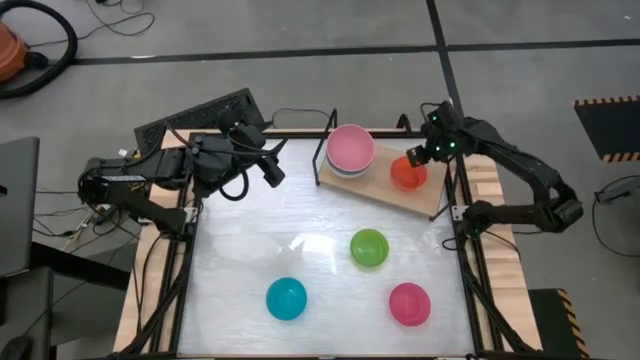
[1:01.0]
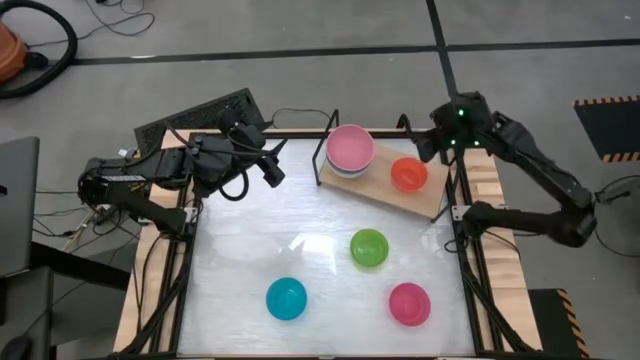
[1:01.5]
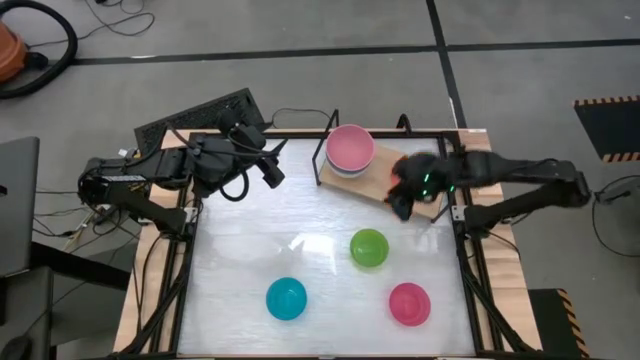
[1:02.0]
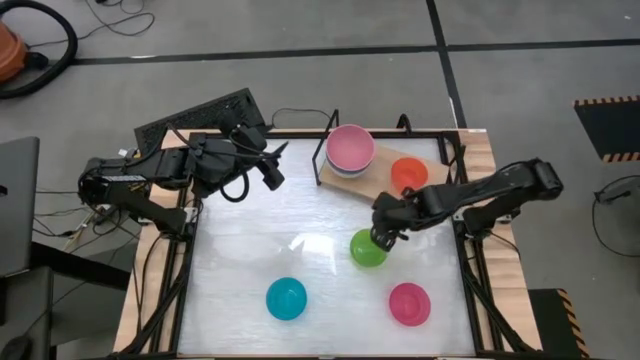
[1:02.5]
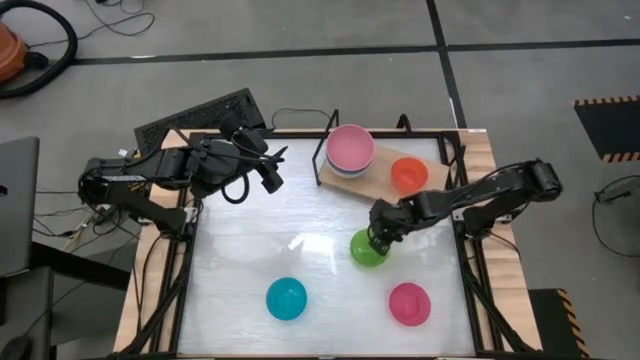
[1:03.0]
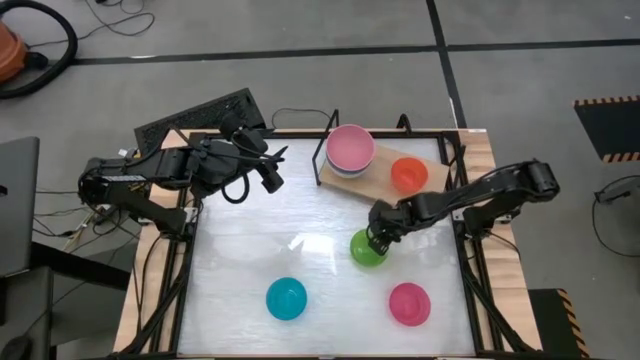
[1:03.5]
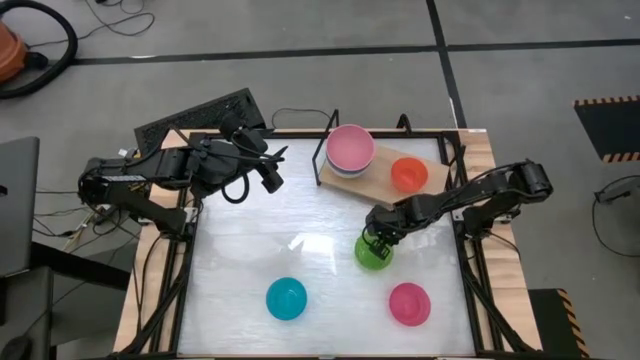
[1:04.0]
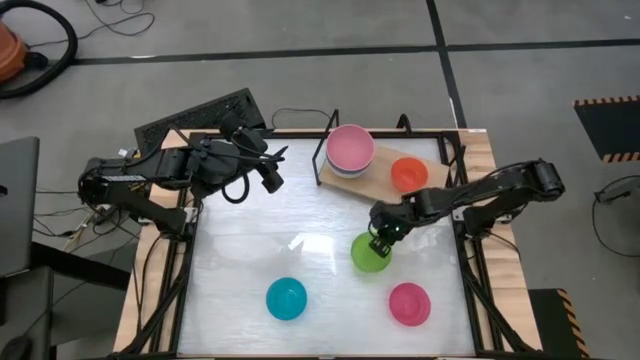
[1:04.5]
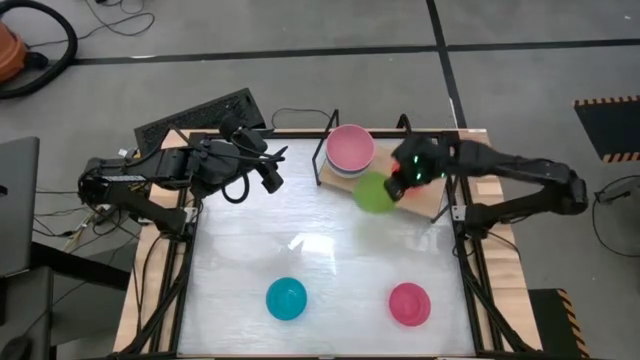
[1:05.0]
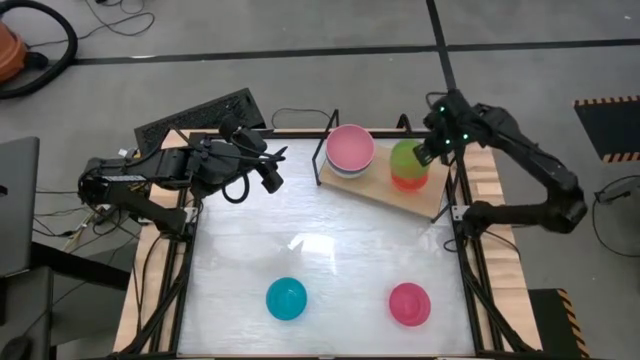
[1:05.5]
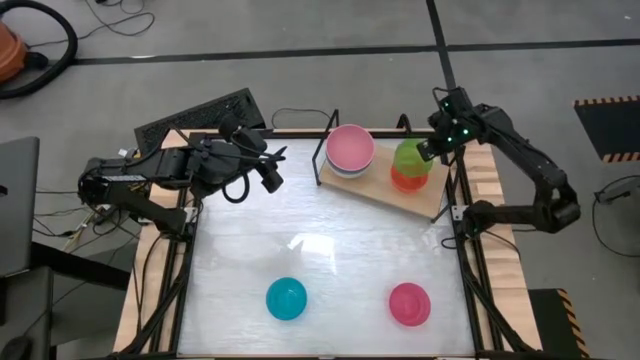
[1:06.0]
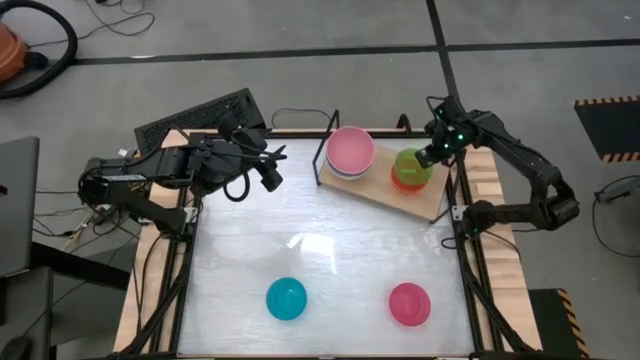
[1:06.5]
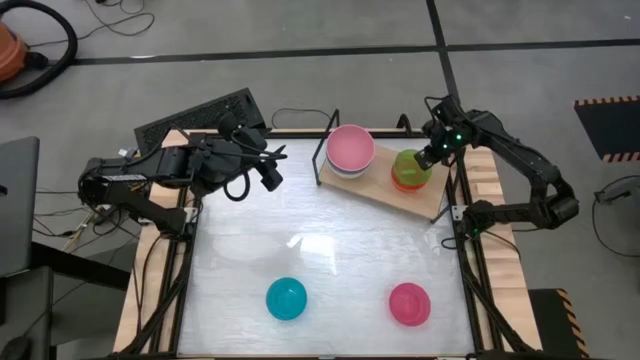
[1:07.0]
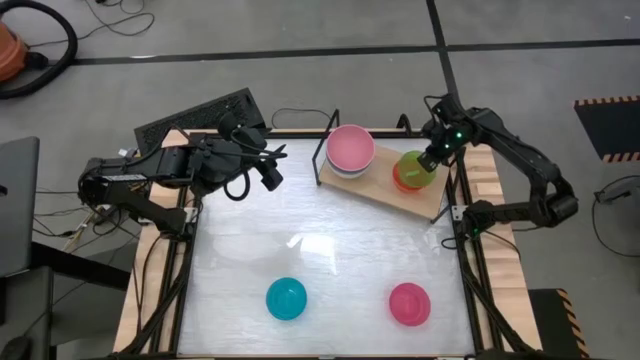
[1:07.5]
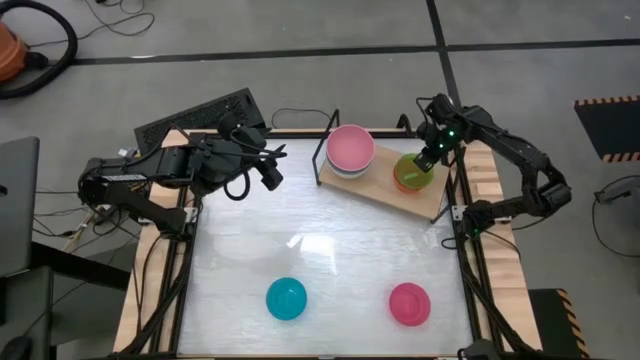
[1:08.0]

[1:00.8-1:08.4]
Task: Place and stack bowls onto a shelf
Stack the light green bowl on top of the orange bowl on the shelf

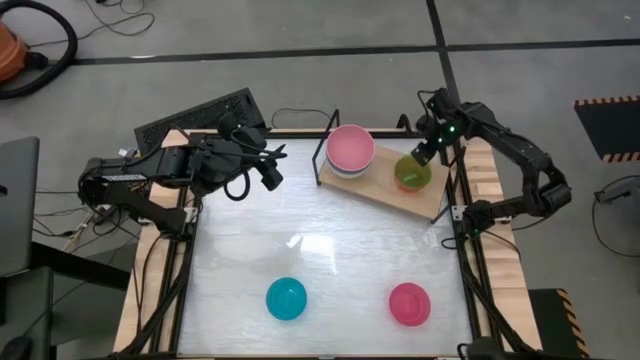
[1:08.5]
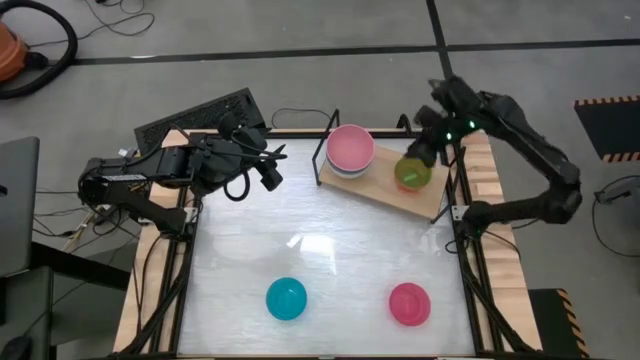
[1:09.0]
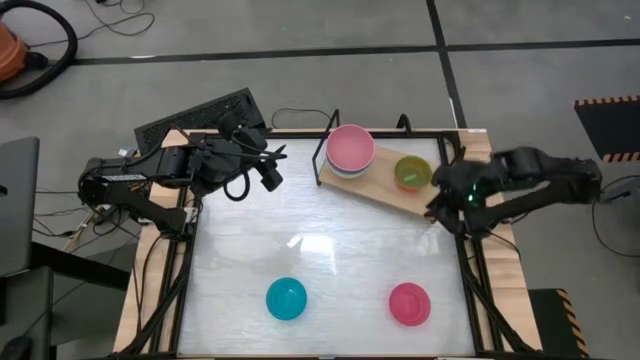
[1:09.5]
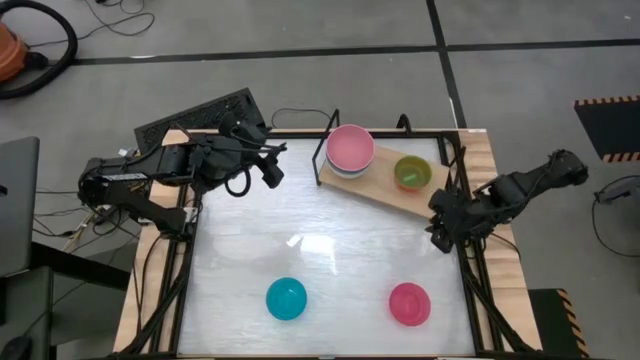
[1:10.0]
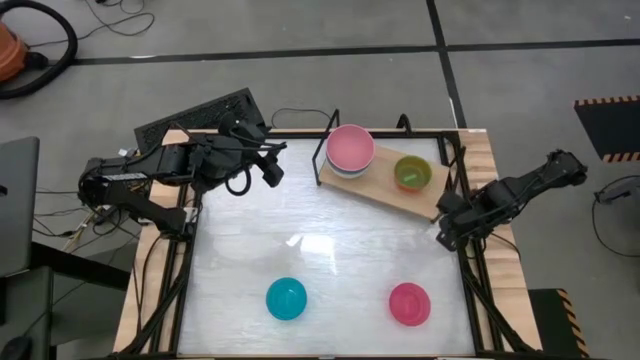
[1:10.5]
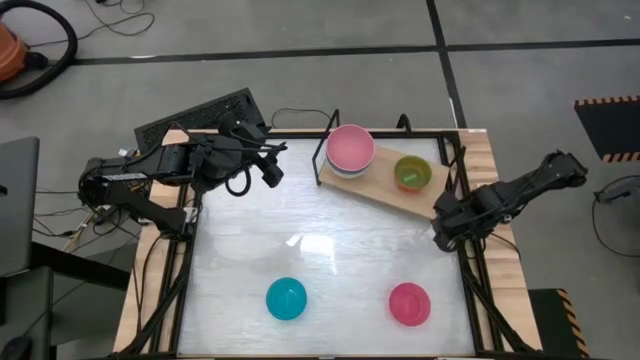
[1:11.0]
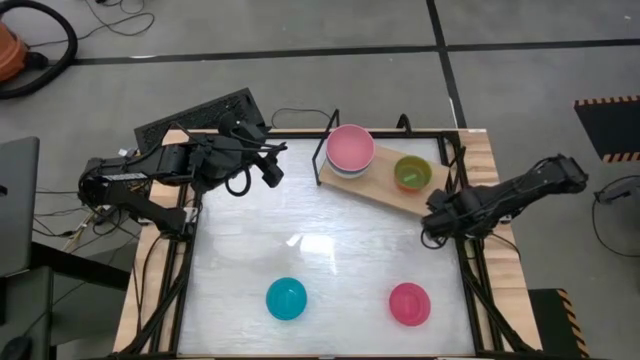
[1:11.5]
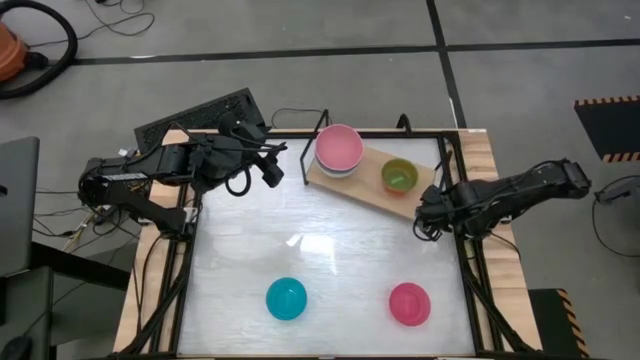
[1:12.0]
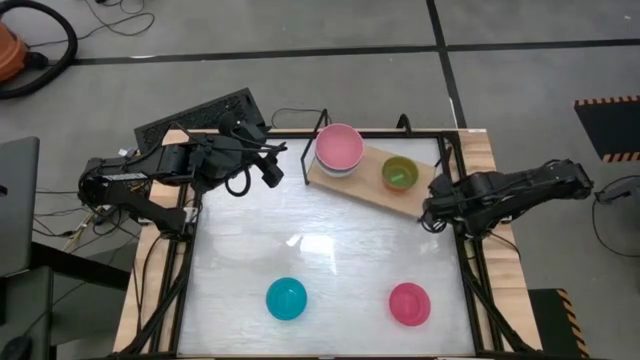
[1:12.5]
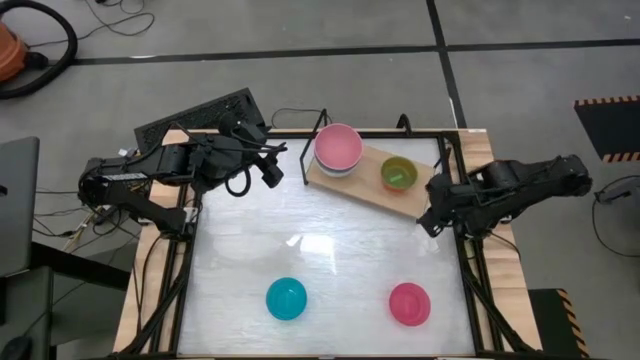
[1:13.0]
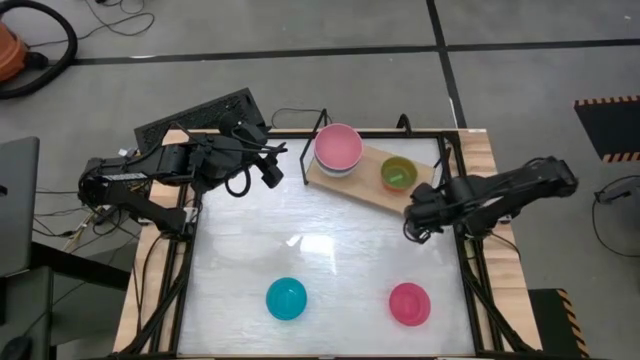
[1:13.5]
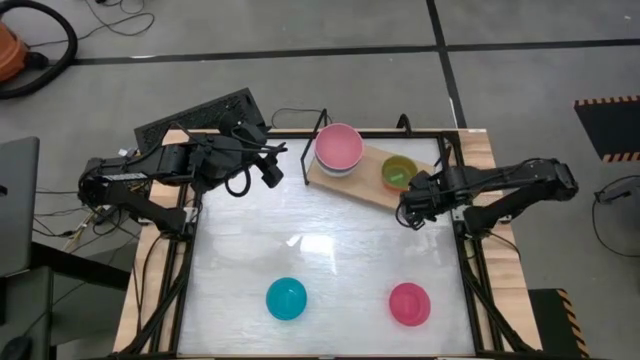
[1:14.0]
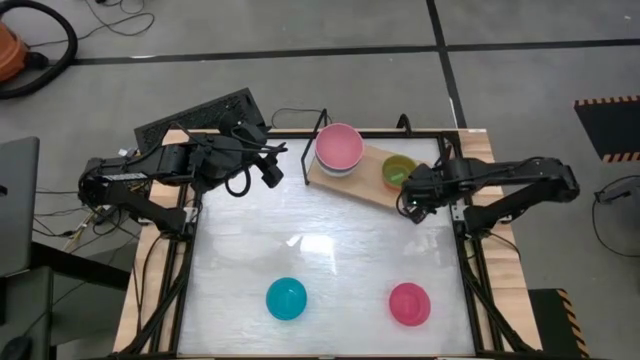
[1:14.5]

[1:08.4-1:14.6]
Adjust the shelf

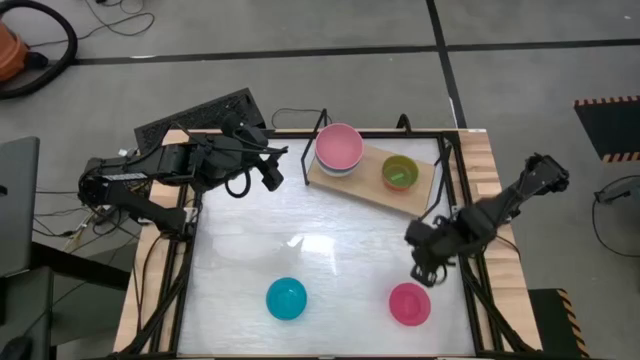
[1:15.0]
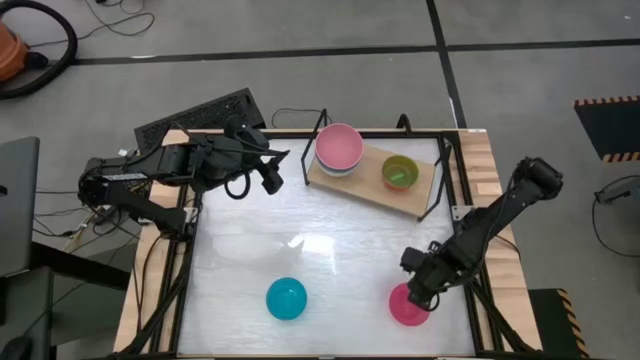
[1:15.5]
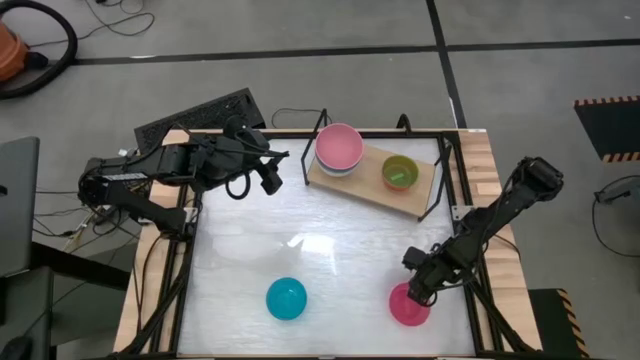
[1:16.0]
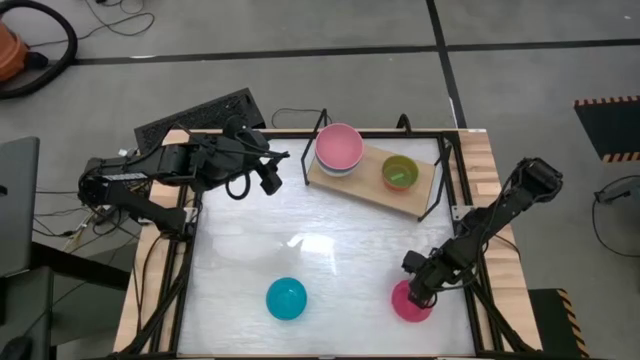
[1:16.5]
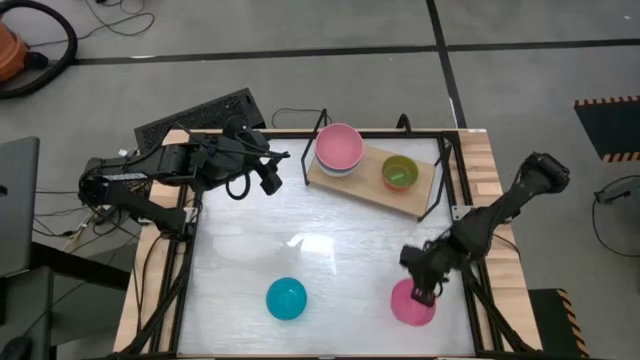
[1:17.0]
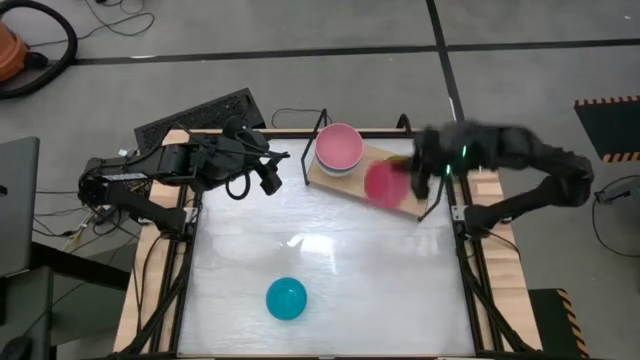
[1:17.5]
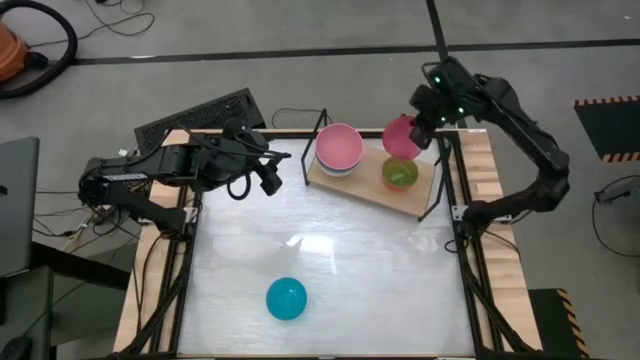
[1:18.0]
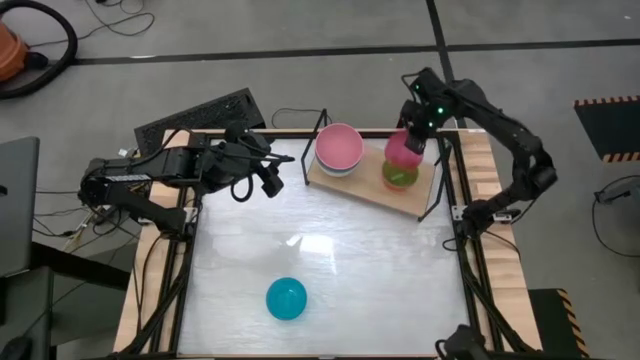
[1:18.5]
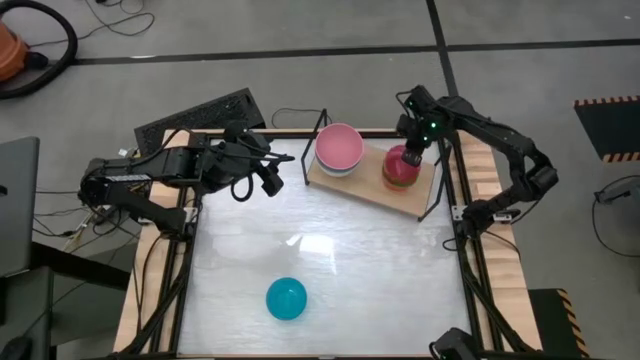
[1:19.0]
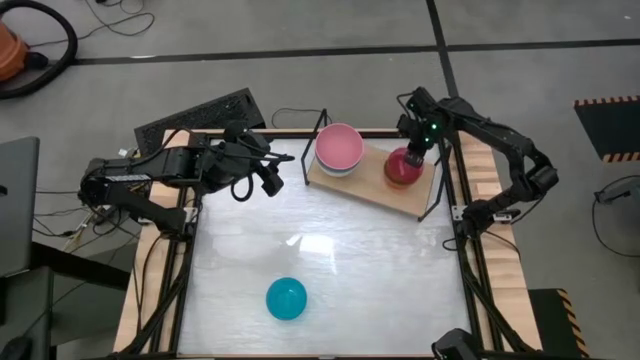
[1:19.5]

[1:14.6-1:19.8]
Stack the light pink bowl on top of the light green bowl on the shelf

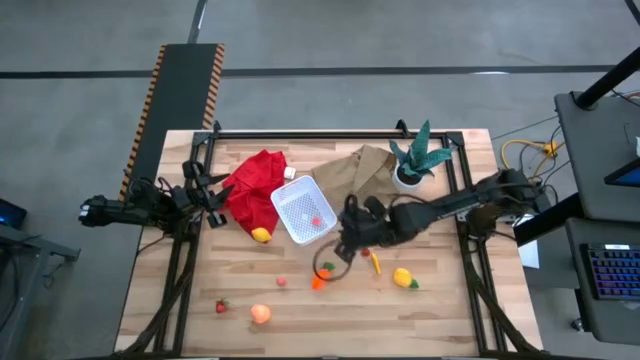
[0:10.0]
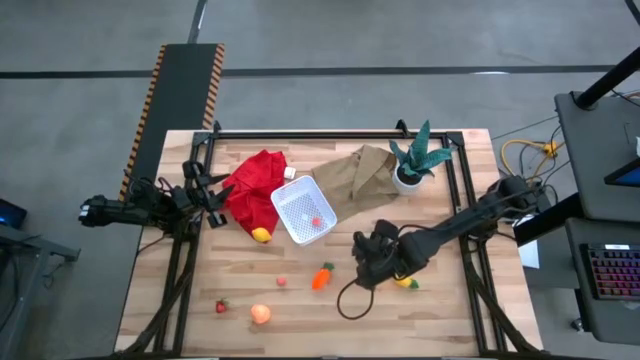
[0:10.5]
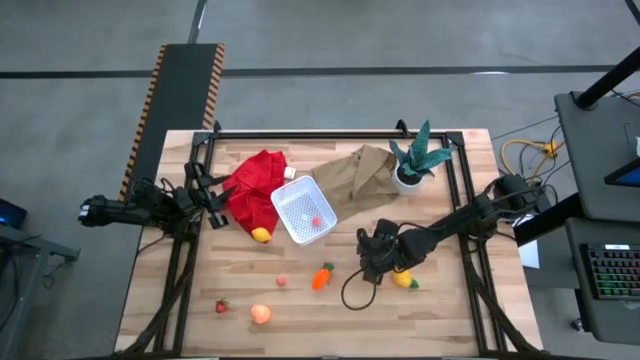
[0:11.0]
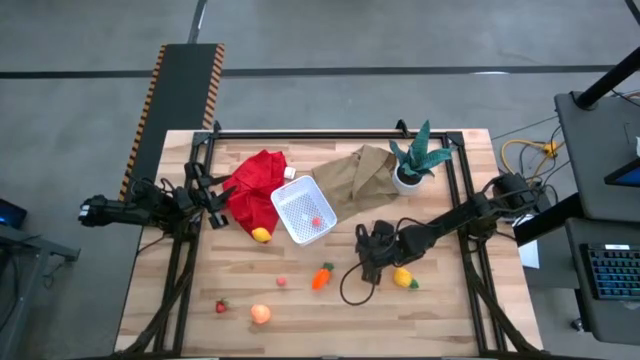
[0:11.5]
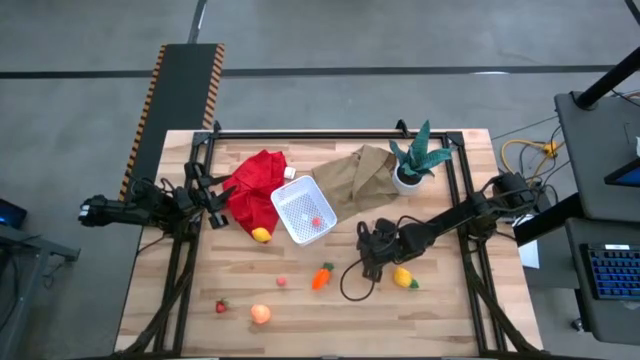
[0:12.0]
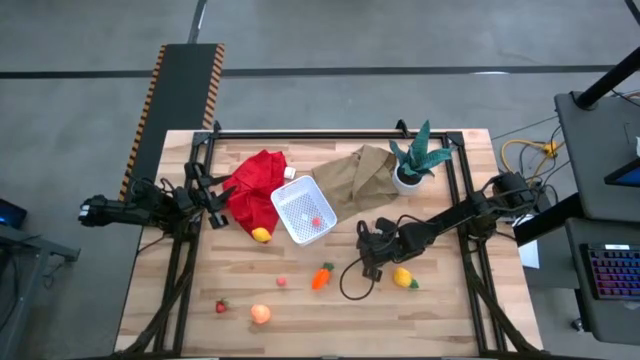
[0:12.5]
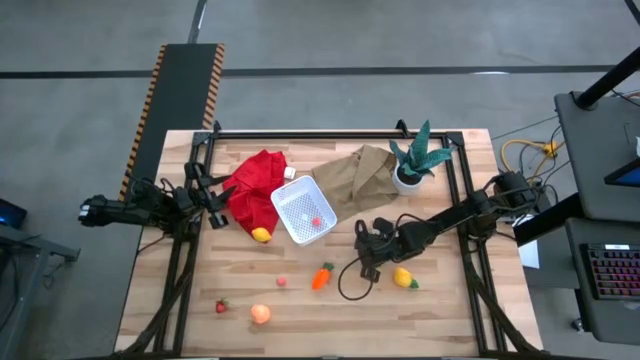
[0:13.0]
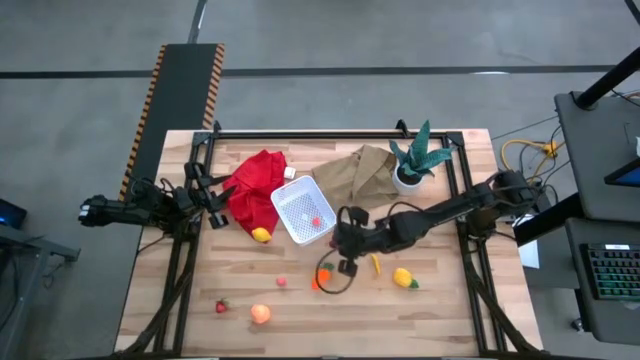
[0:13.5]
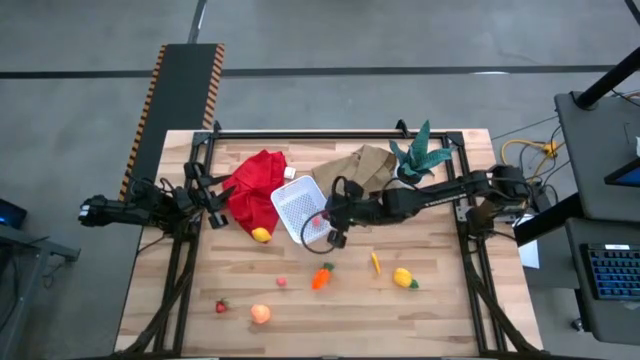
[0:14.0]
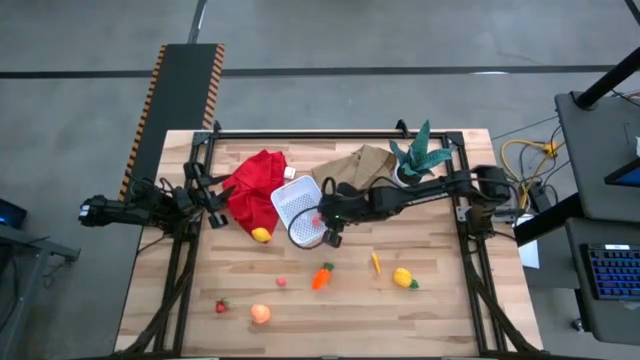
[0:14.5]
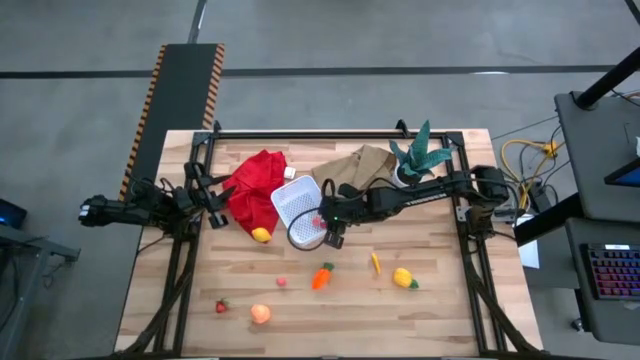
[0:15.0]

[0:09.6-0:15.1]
Task: Pick and placing Produce into tupperware
Put the right toy strawberry into the white bin
